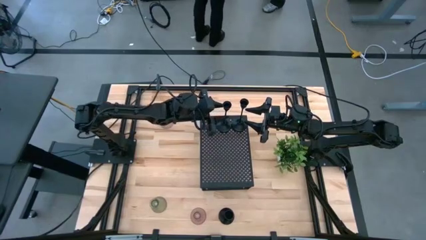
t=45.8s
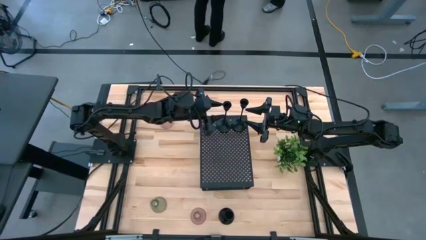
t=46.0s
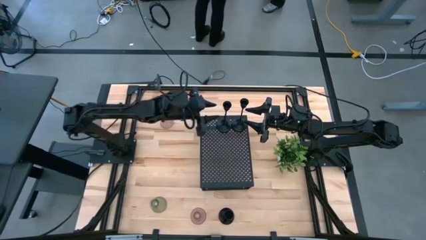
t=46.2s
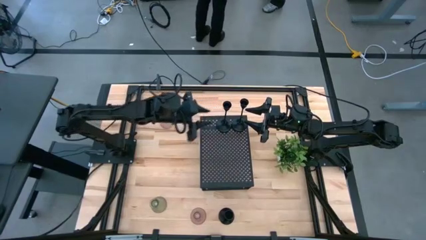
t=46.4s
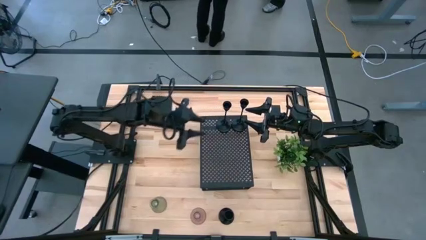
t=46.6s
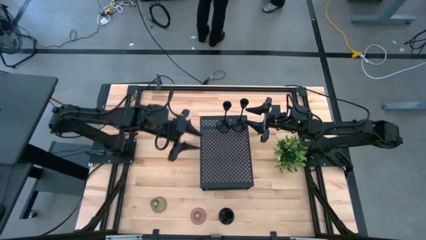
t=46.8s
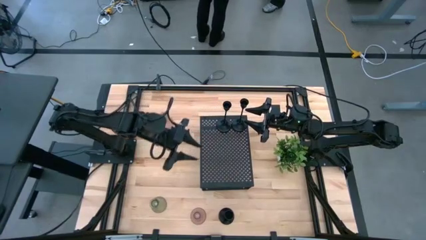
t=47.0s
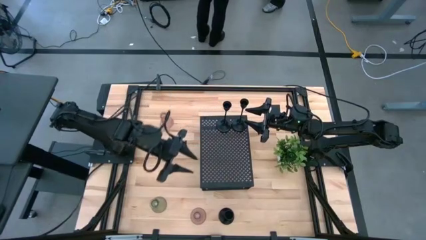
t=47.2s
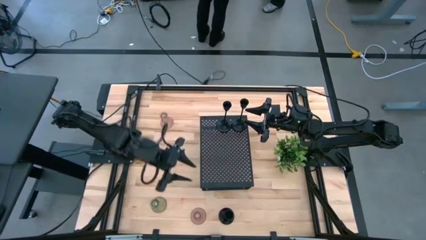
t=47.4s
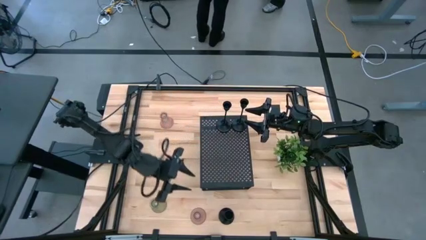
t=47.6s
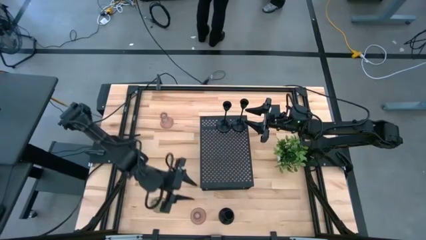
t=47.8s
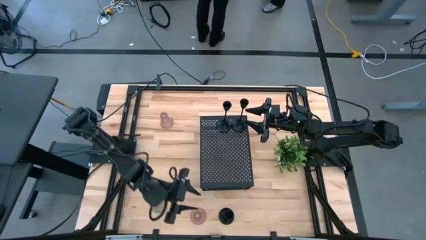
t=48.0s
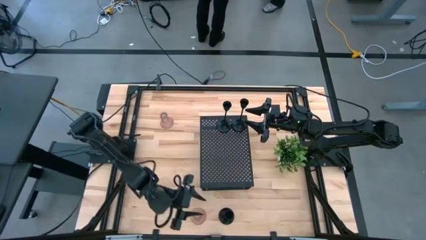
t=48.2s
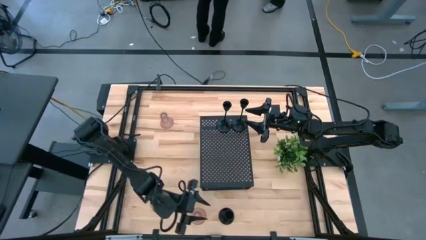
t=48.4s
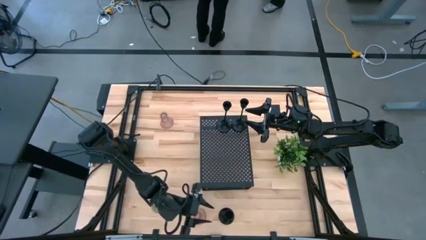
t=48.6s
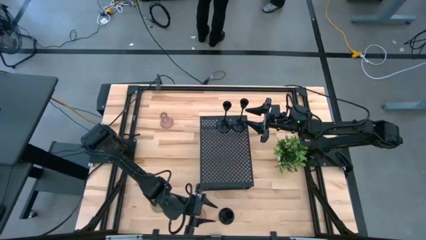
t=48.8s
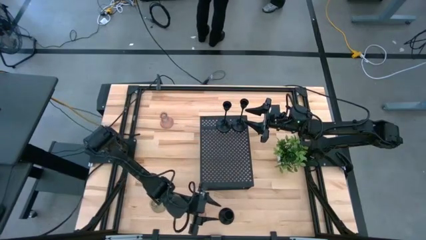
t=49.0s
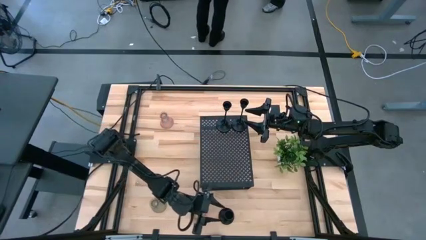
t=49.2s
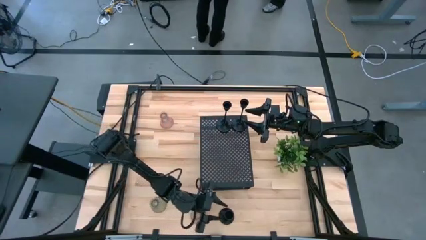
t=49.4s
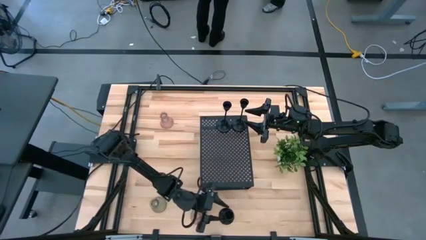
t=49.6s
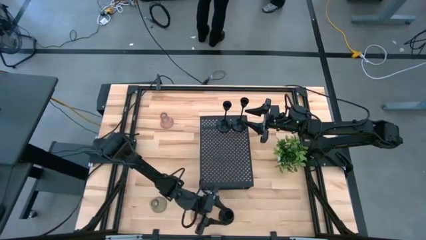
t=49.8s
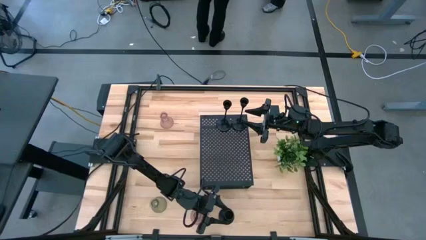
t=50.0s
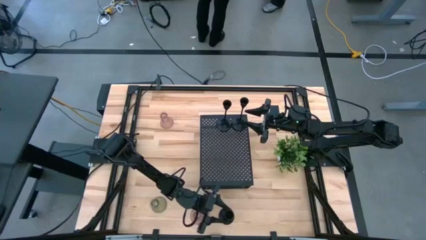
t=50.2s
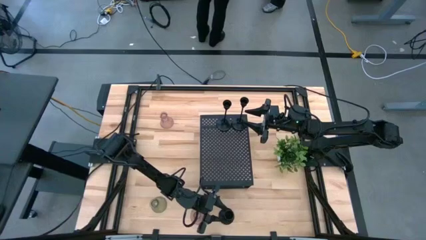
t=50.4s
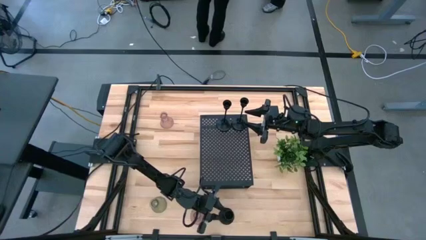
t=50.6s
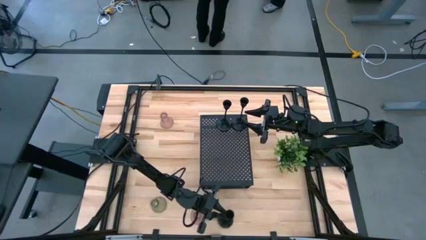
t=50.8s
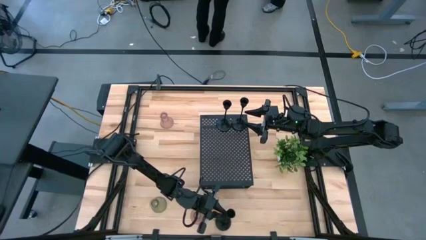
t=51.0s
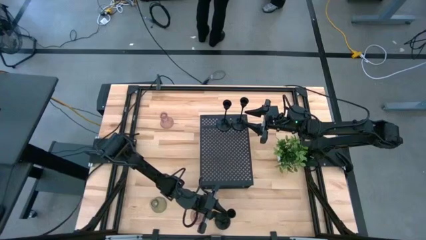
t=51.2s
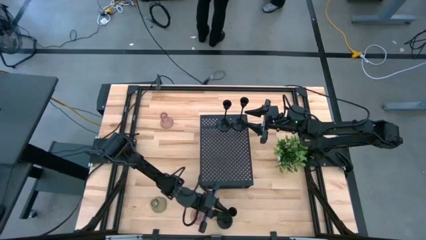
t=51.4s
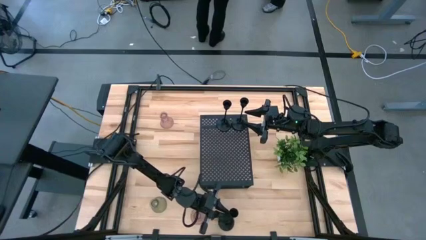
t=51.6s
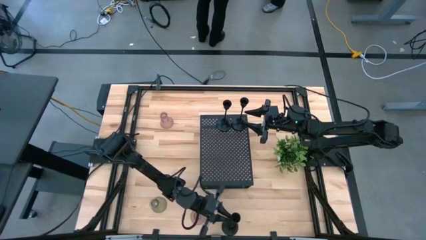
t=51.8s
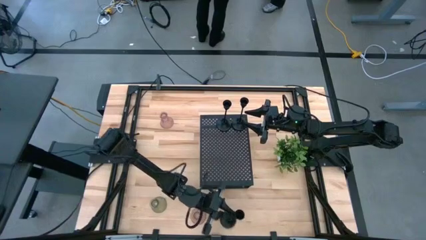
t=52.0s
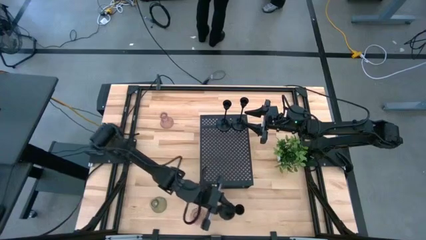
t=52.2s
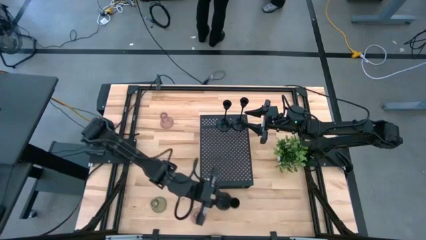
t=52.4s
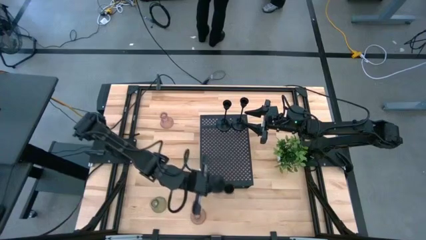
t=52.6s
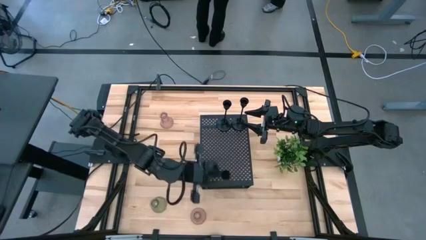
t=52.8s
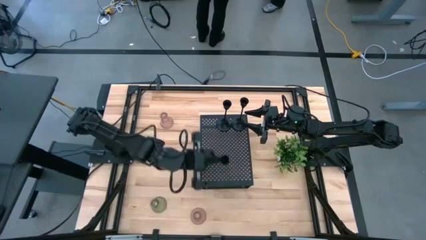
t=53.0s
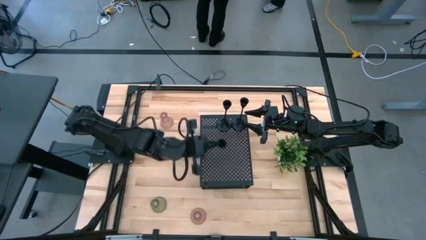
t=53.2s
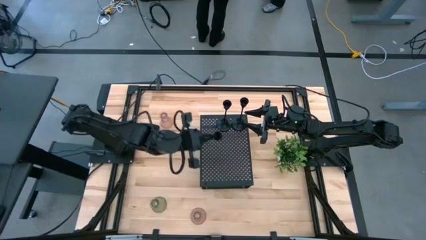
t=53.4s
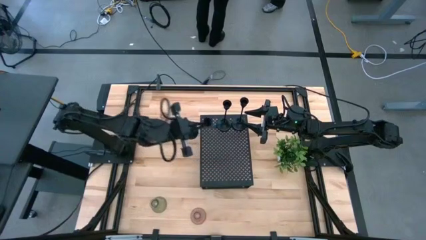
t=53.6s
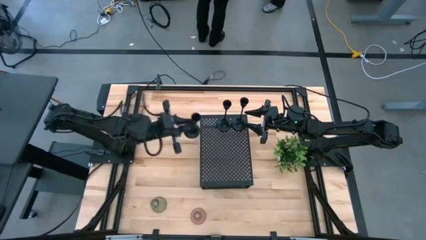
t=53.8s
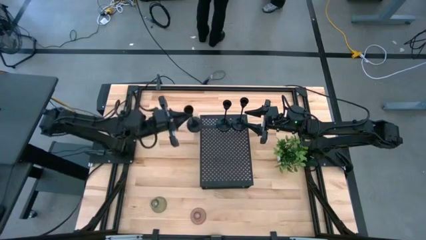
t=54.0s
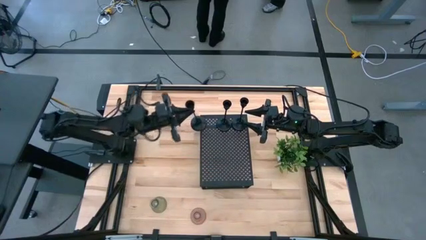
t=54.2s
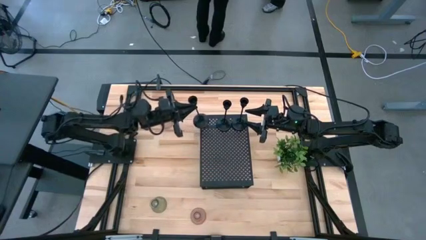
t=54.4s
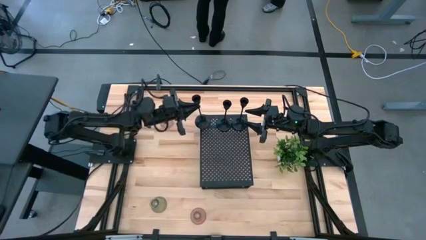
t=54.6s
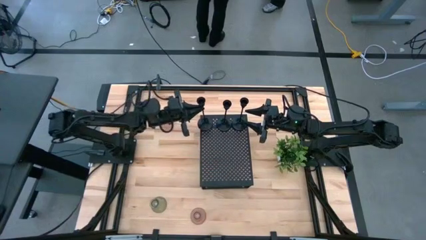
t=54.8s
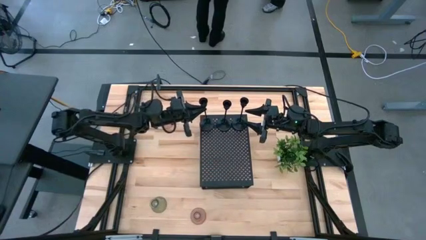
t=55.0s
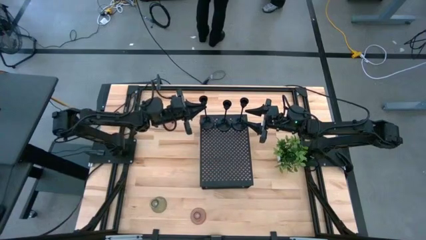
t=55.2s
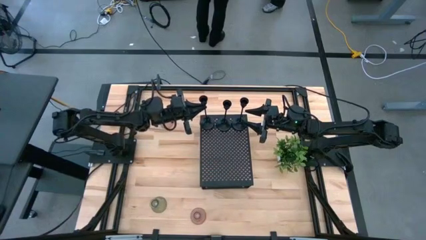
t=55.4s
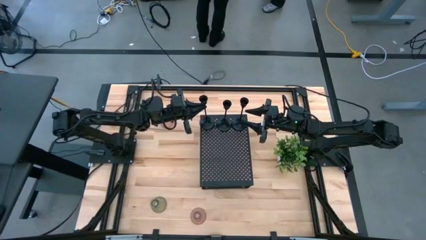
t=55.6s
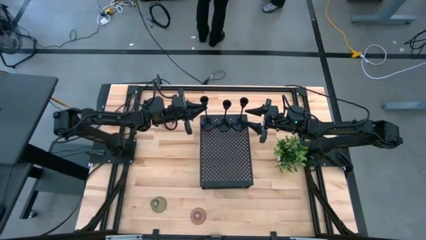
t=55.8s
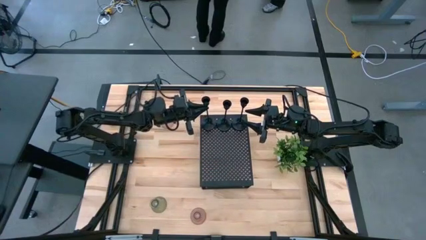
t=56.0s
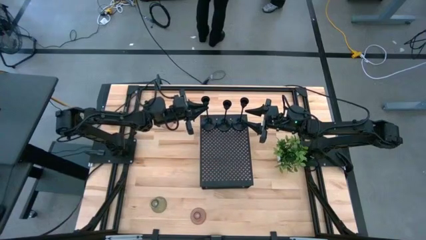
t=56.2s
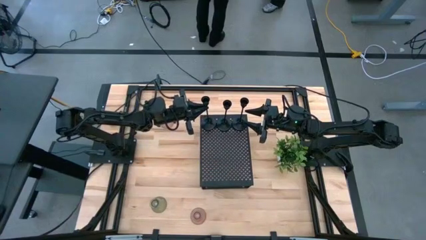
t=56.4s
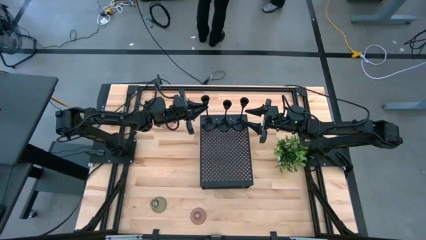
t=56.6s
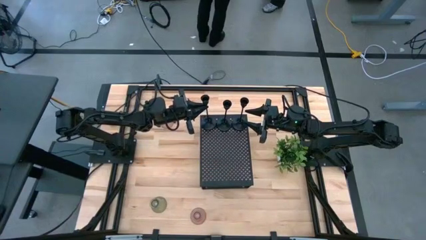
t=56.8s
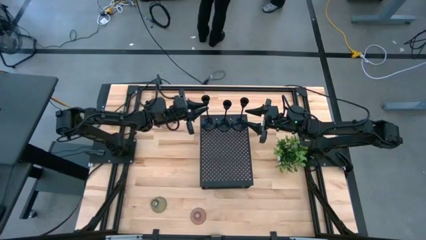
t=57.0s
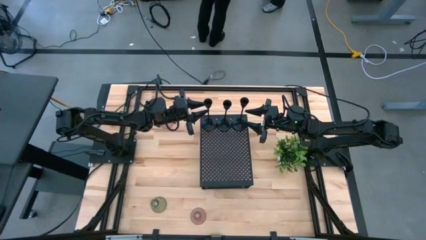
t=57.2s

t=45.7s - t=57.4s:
Task: Pick & Place candle stick holders
Align the black candle holder with the other black candle holder on the shelf
